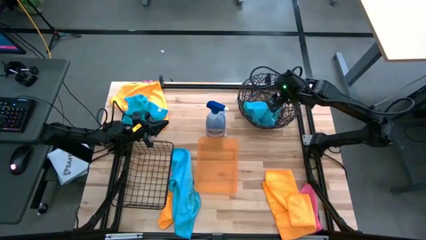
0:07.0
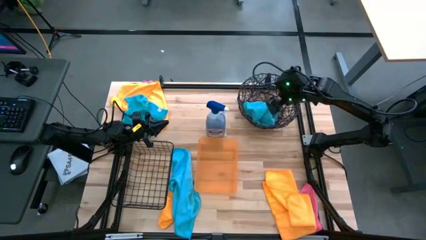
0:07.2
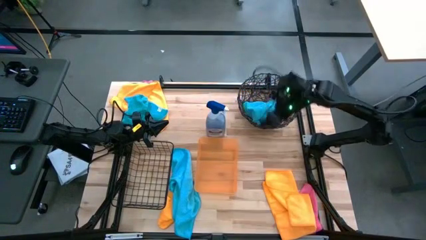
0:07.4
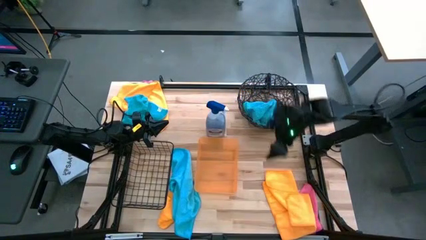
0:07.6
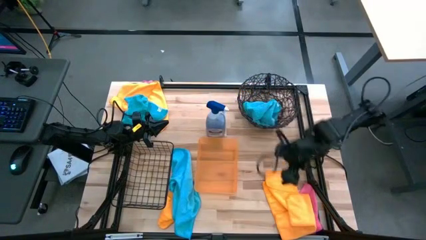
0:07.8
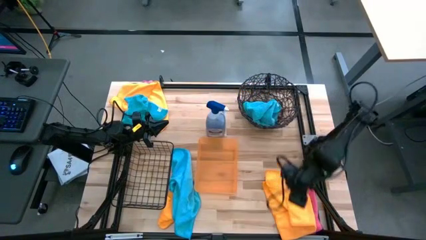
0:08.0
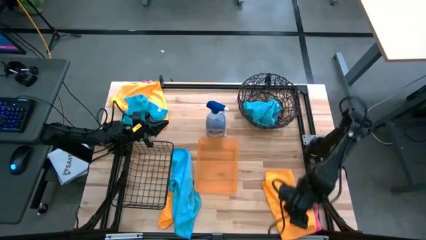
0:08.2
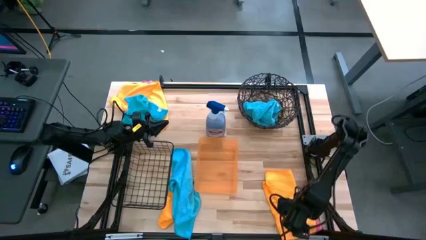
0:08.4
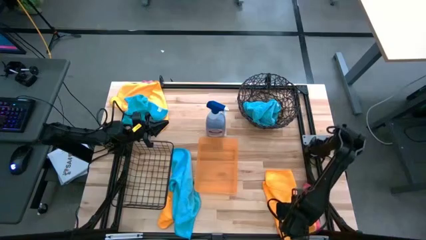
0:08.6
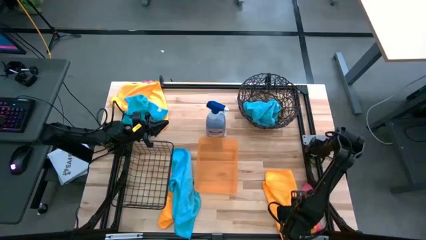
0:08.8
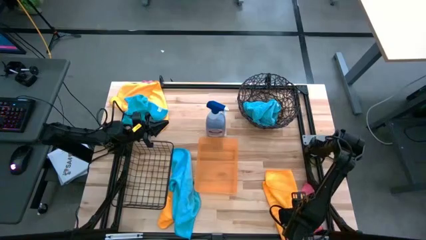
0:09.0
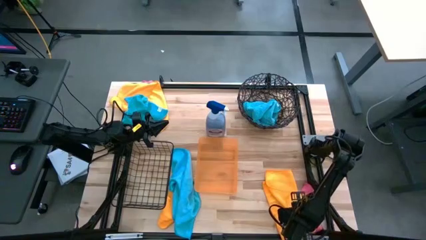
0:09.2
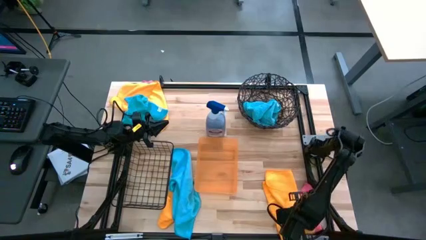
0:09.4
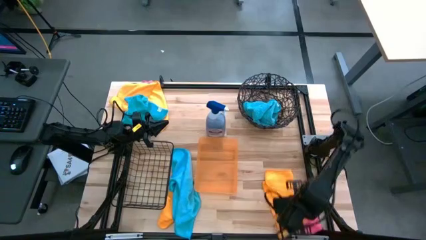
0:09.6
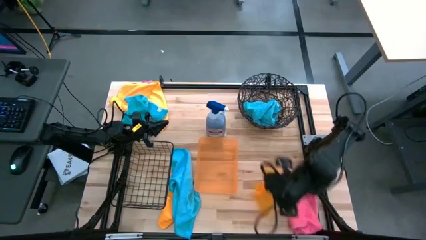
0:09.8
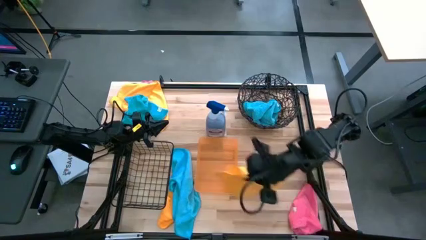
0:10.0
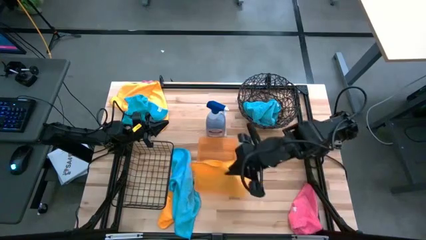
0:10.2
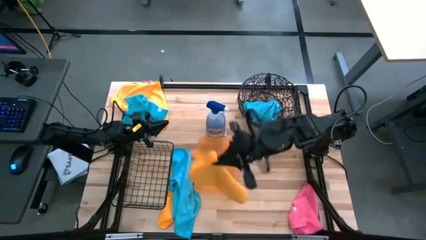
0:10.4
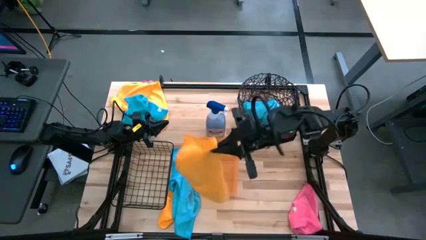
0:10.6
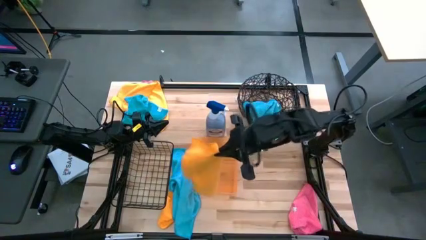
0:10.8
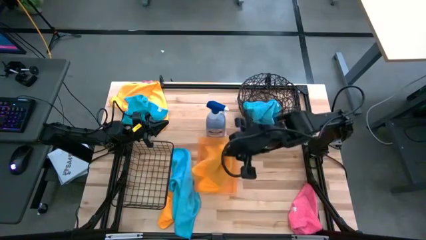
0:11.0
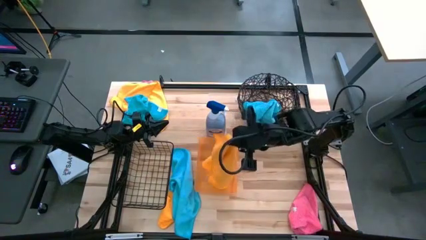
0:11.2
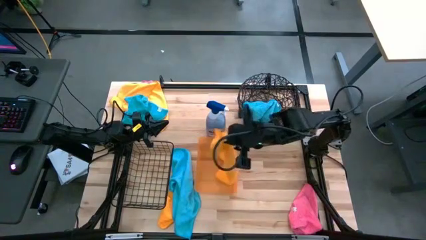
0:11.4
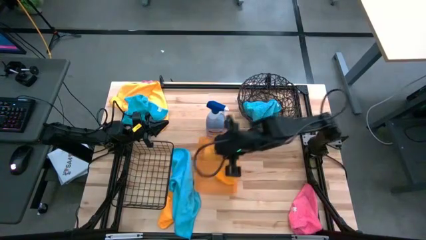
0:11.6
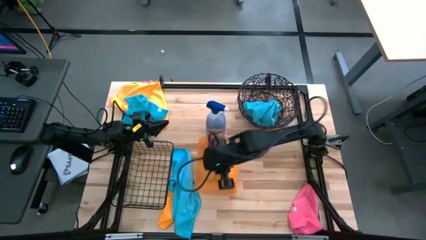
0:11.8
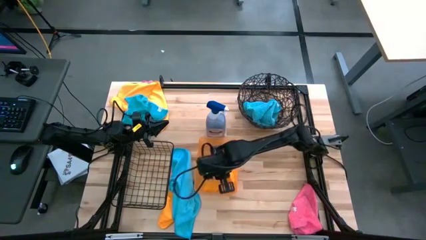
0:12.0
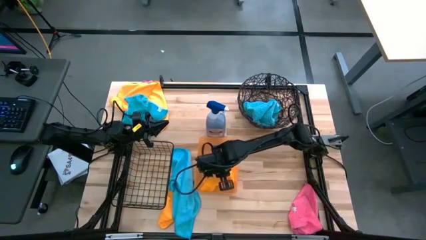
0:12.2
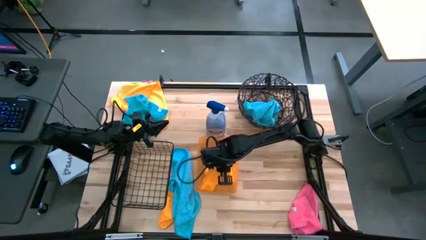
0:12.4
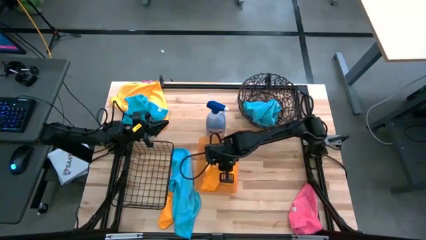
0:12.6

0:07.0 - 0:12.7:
Task: Sort microfiber towel by color & place in baskets
Put the bottom right yellow towel into the orange bin

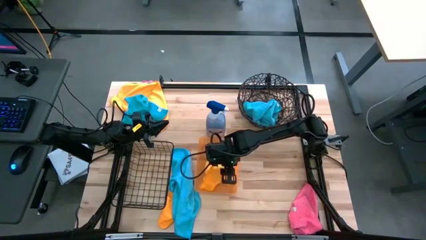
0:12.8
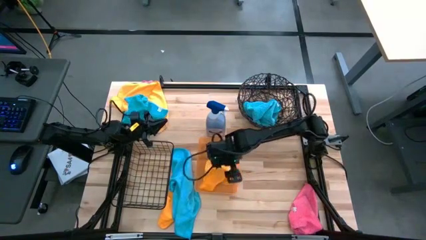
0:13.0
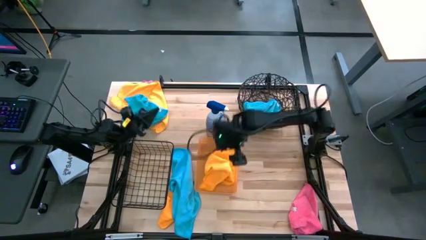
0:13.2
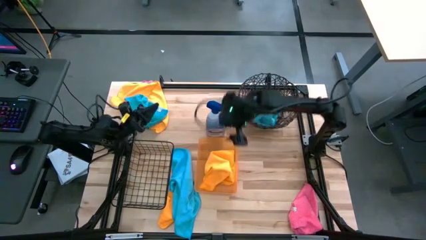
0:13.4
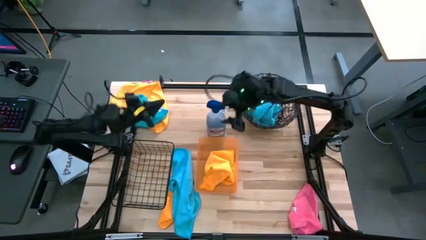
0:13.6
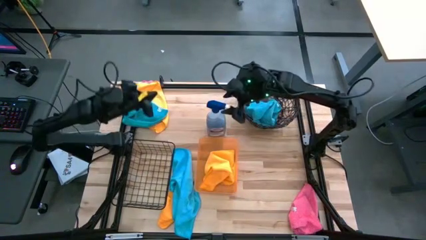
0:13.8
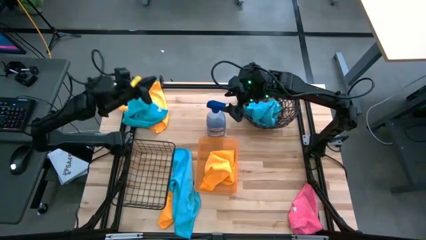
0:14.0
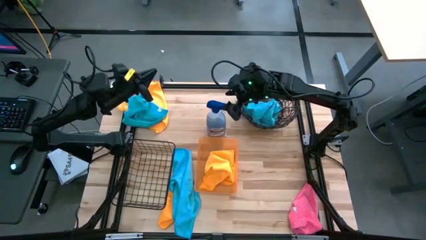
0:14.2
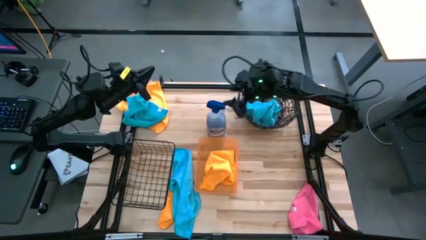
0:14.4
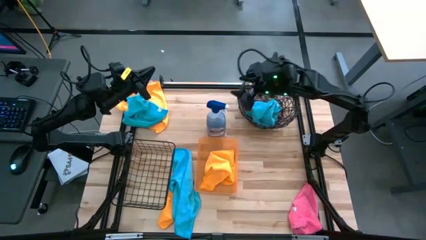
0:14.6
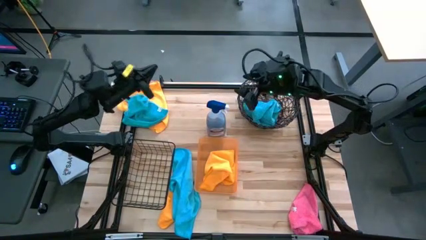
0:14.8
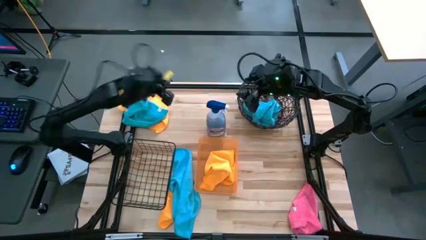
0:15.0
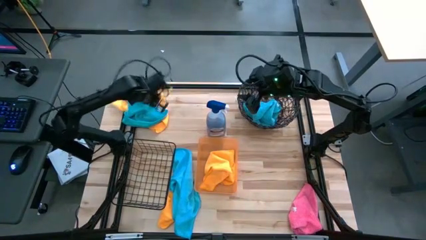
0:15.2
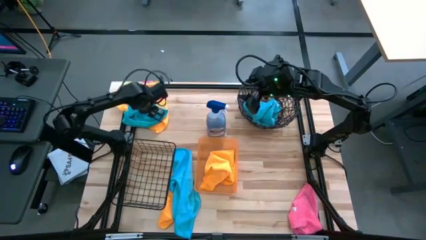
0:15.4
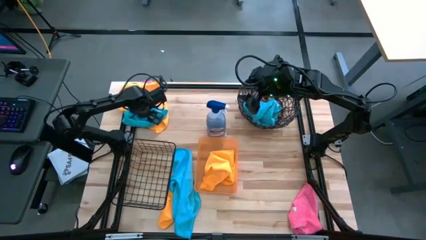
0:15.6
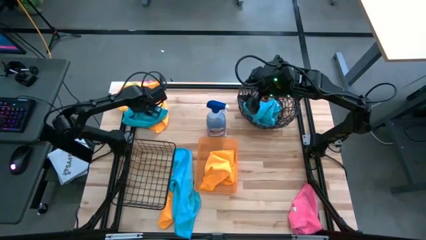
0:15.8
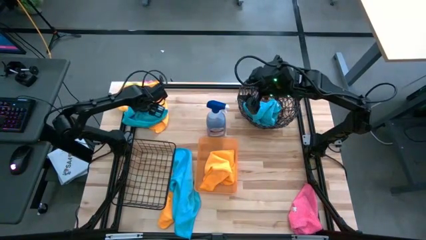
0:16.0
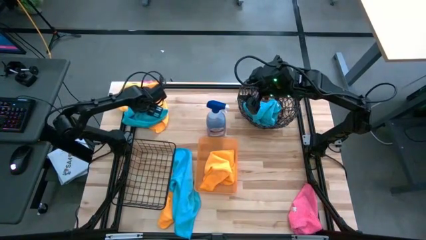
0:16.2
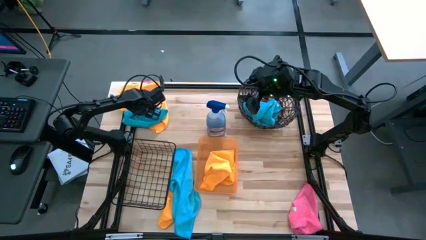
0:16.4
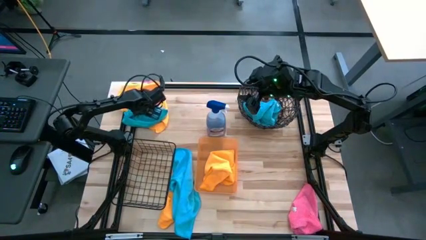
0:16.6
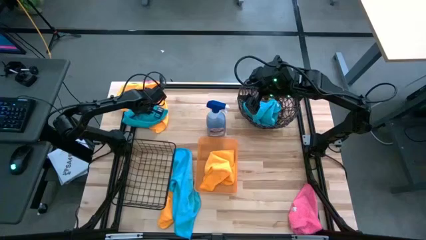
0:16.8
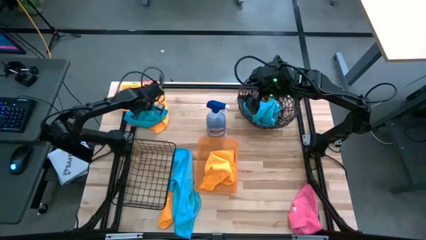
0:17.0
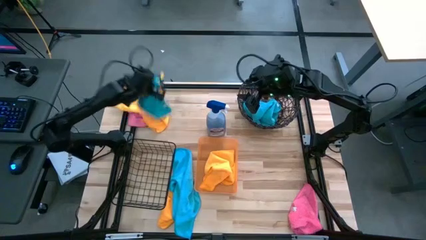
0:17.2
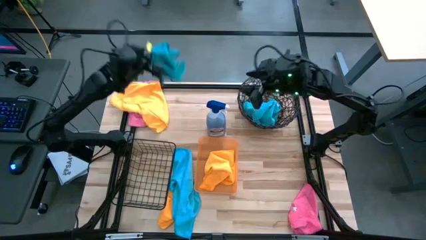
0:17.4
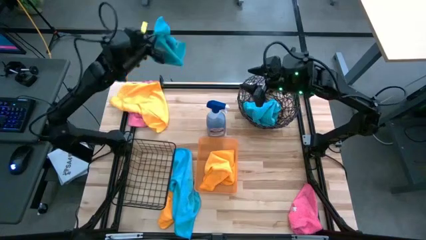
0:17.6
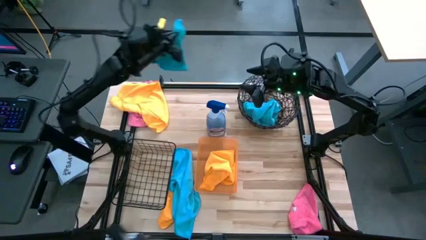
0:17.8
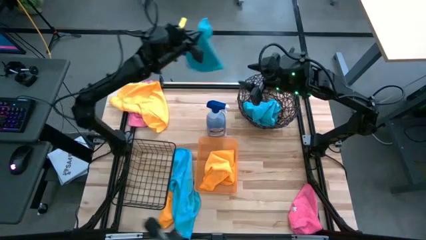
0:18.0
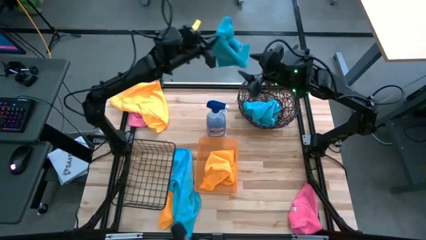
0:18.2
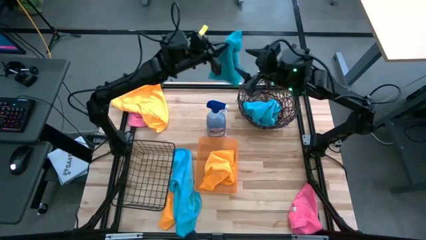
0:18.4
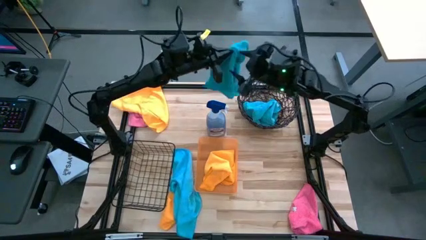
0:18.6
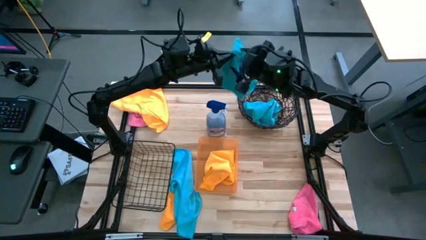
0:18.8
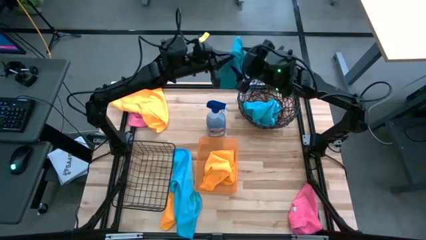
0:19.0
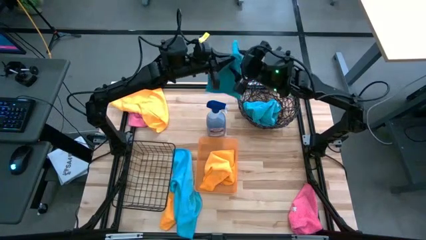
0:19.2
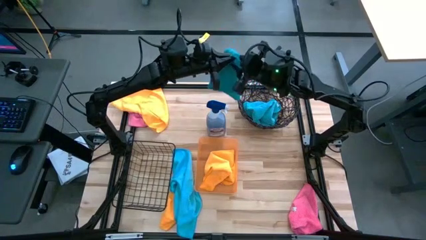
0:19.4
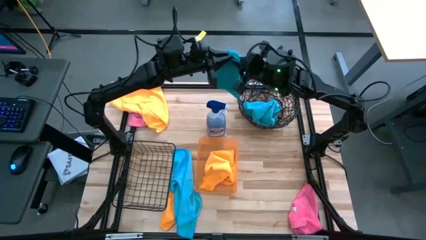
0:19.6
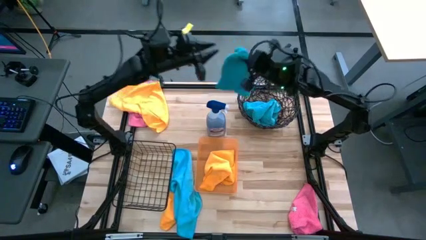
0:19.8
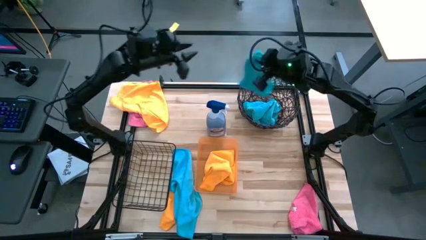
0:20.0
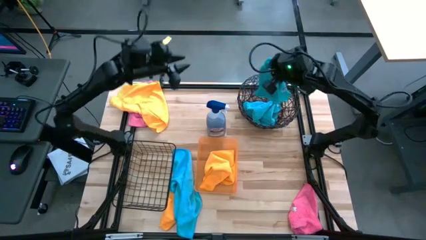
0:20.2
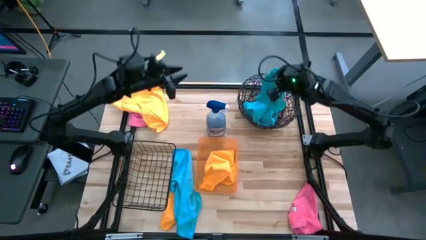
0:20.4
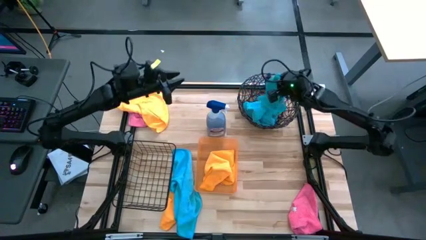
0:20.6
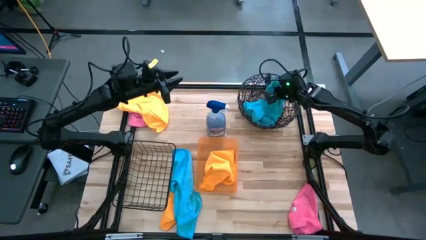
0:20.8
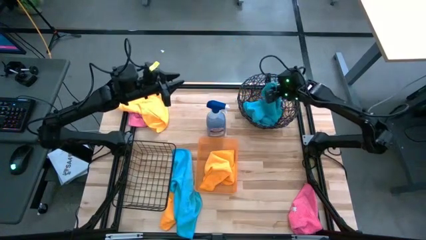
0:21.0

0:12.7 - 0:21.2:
Put the top blue towel into the brown woven basket

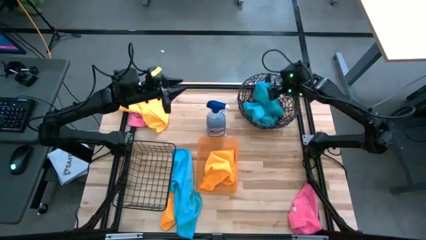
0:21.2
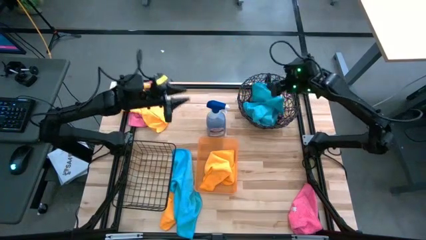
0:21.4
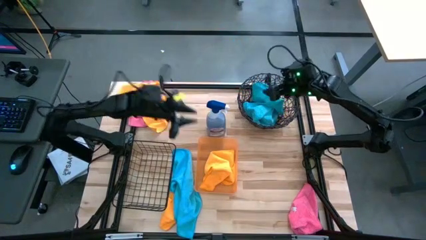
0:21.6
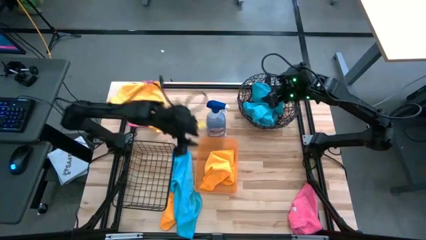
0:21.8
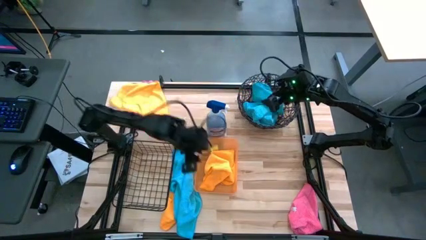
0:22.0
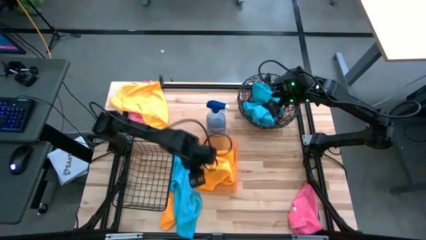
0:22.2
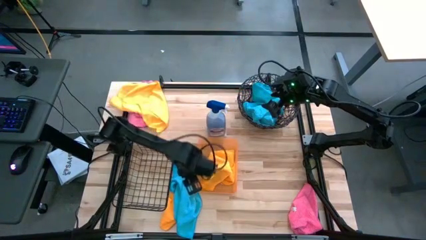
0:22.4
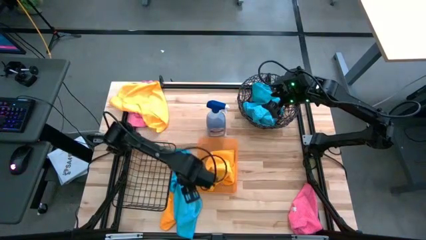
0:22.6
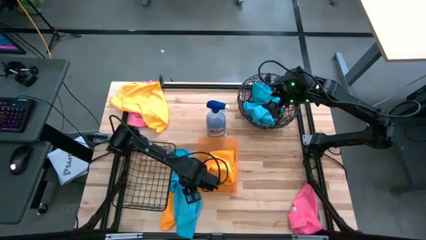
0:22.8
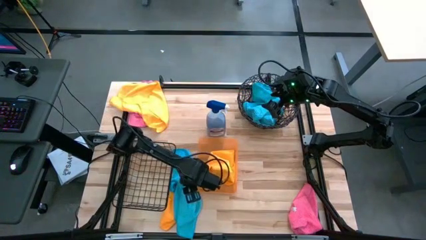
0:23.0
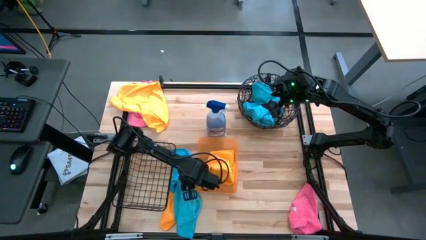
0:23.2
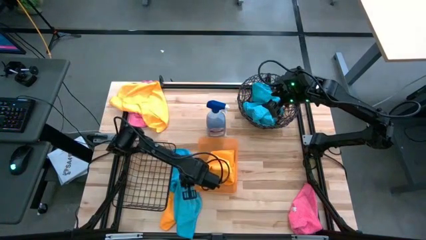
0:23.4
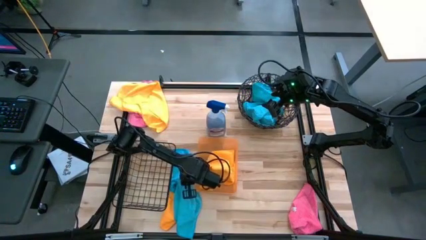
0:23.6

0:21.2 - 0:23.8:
Put the blue towel into the brown woven basket
